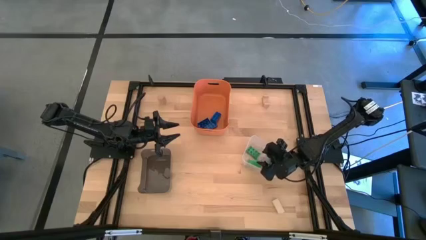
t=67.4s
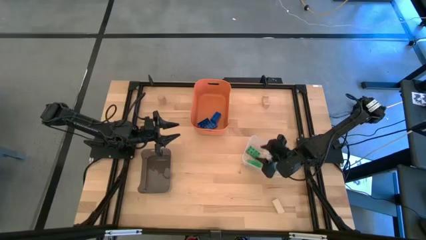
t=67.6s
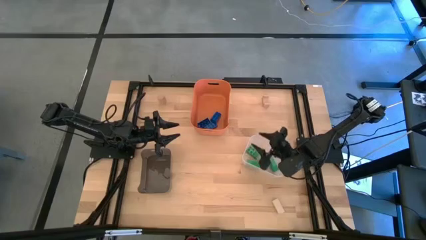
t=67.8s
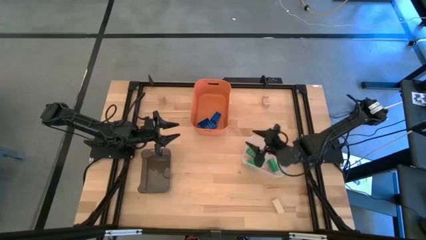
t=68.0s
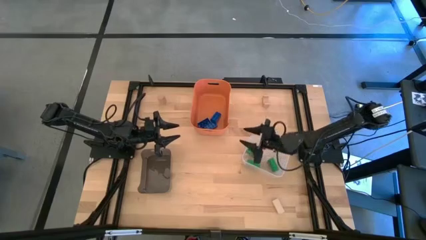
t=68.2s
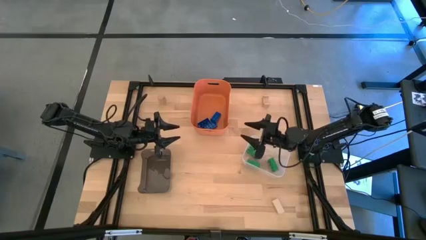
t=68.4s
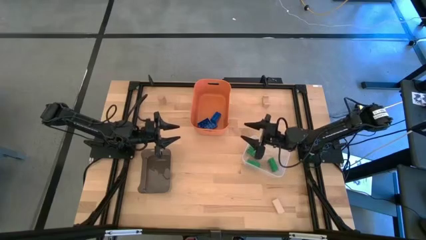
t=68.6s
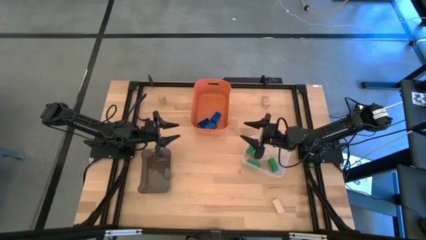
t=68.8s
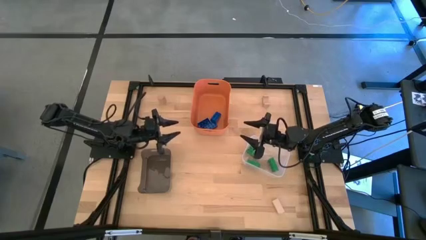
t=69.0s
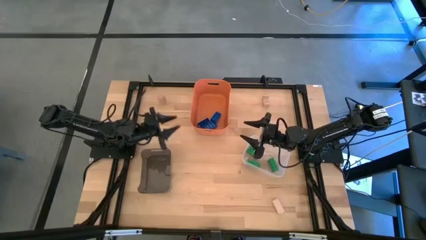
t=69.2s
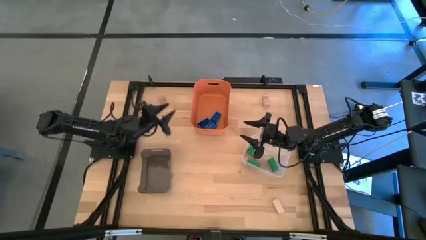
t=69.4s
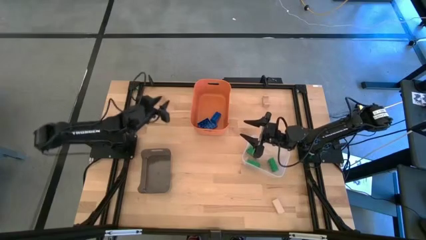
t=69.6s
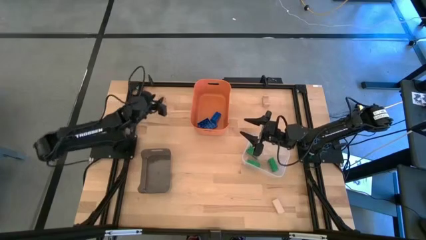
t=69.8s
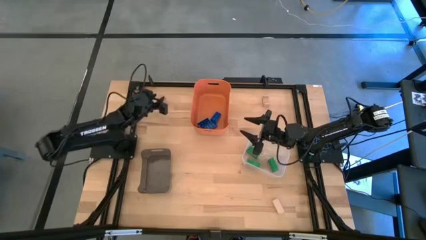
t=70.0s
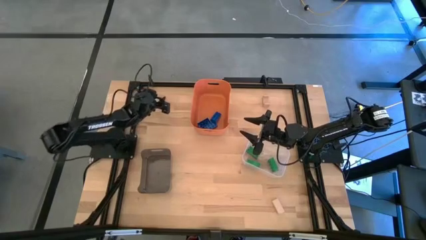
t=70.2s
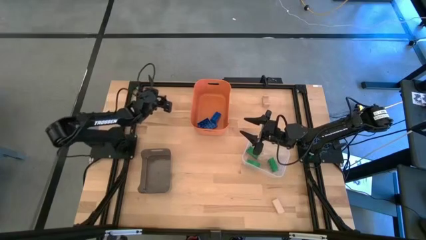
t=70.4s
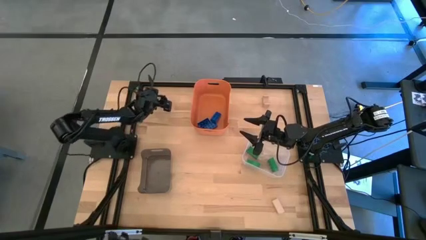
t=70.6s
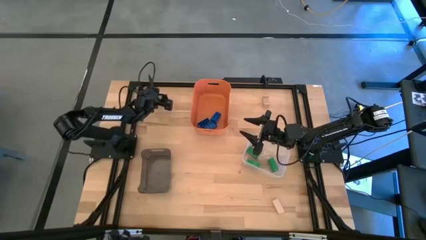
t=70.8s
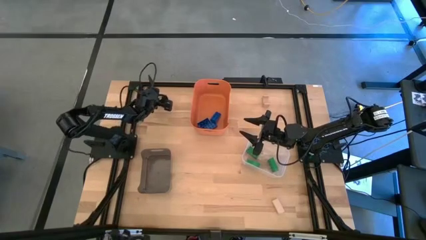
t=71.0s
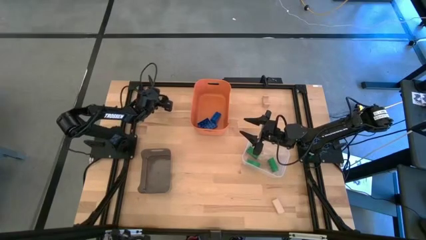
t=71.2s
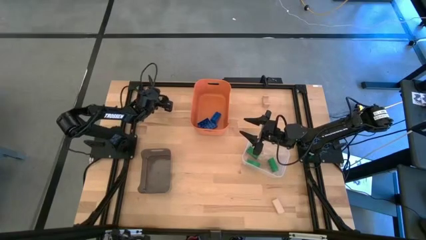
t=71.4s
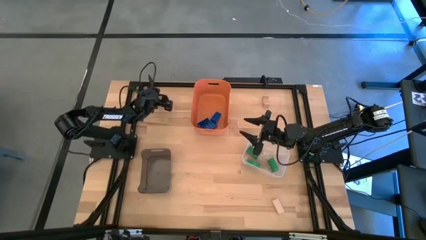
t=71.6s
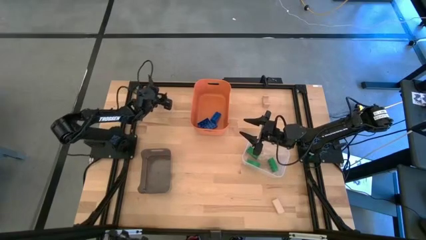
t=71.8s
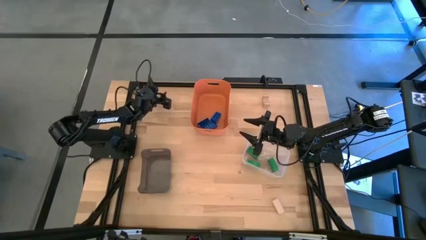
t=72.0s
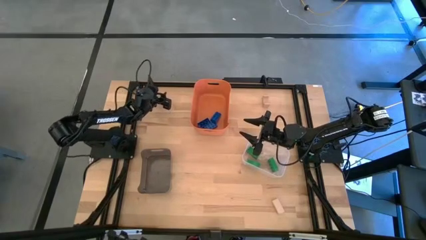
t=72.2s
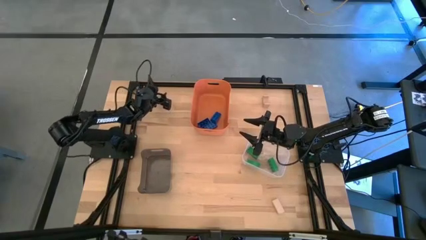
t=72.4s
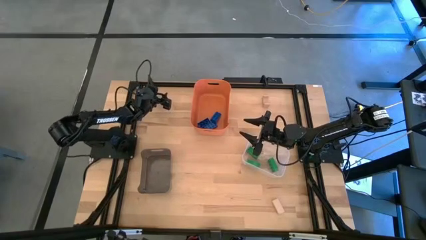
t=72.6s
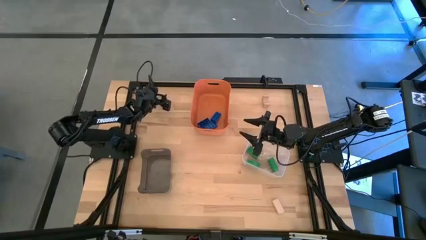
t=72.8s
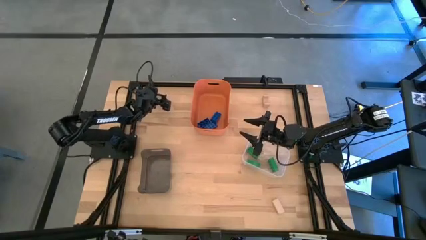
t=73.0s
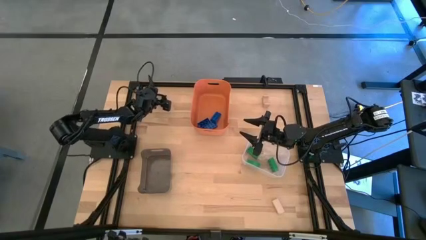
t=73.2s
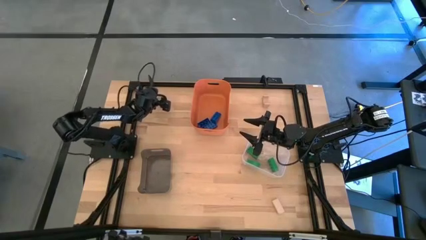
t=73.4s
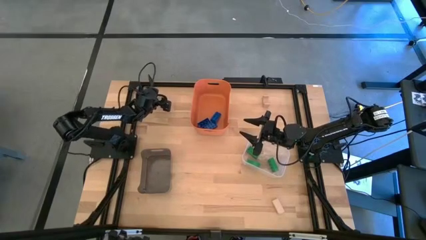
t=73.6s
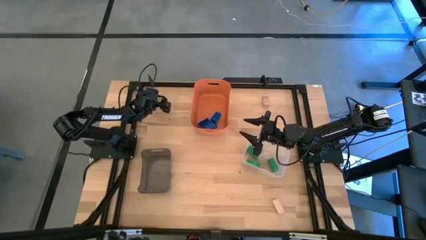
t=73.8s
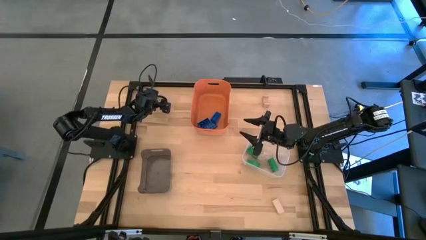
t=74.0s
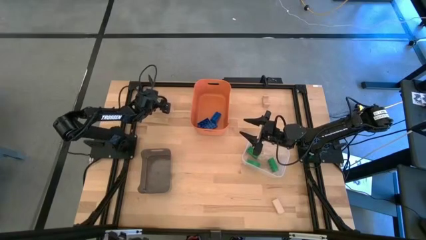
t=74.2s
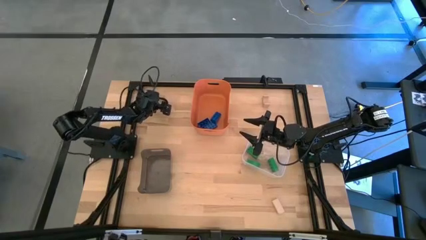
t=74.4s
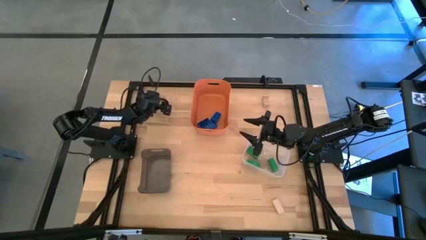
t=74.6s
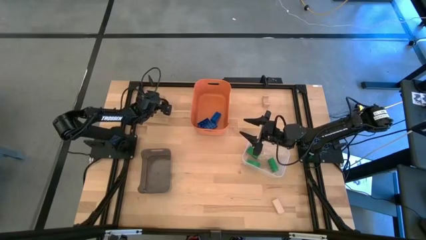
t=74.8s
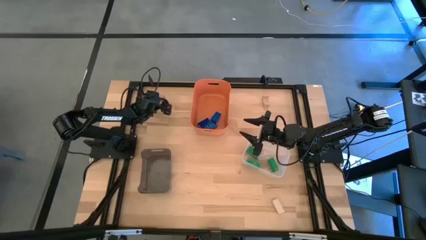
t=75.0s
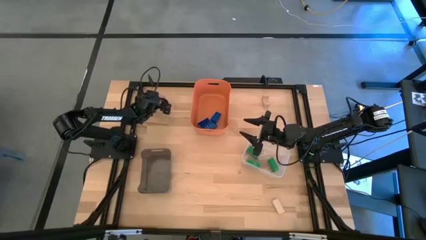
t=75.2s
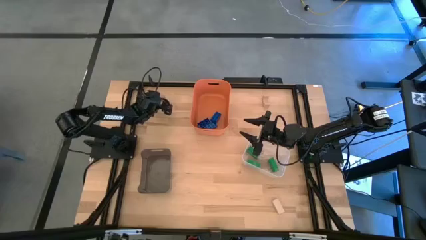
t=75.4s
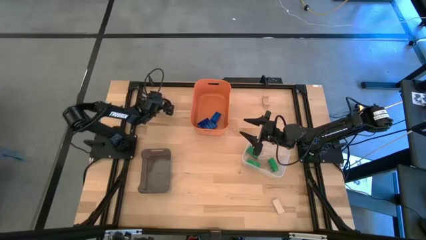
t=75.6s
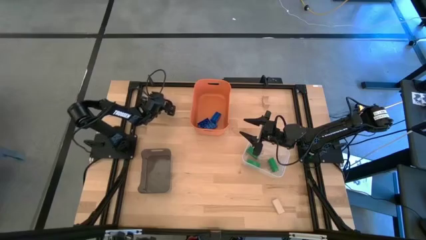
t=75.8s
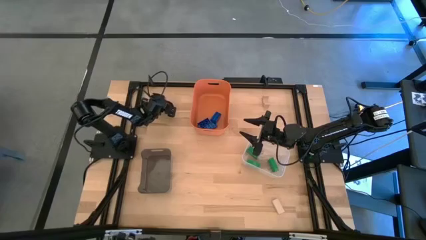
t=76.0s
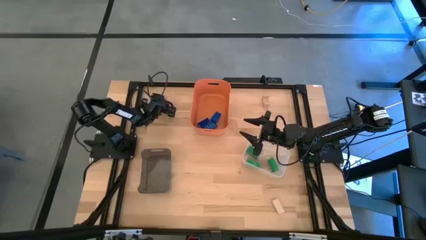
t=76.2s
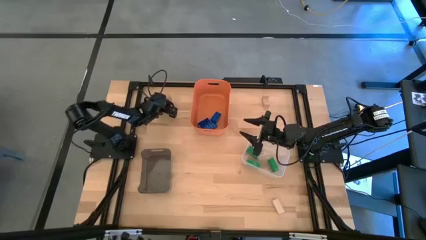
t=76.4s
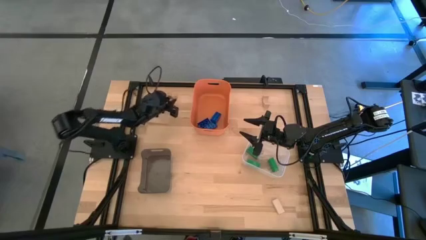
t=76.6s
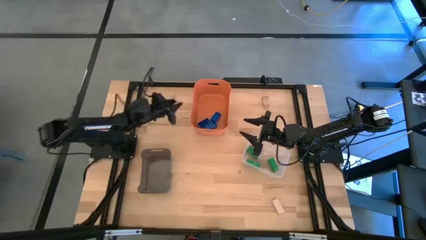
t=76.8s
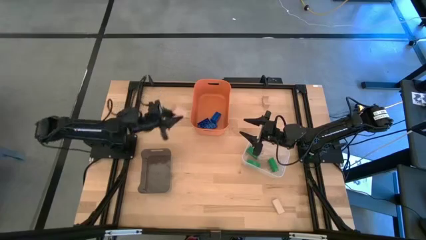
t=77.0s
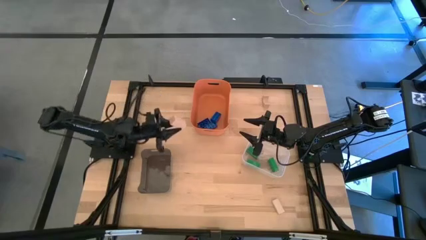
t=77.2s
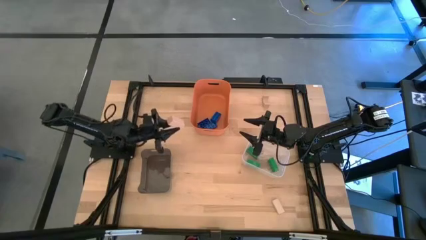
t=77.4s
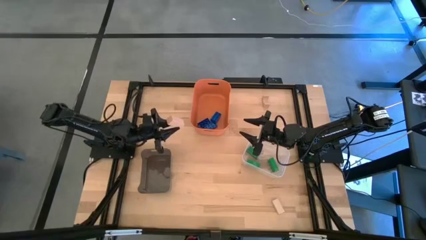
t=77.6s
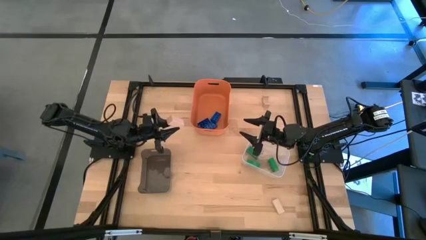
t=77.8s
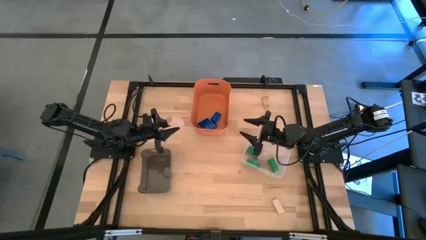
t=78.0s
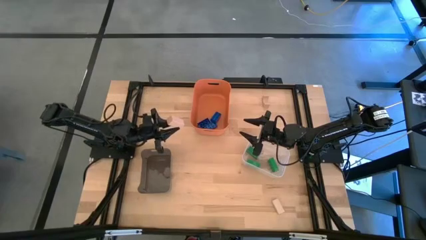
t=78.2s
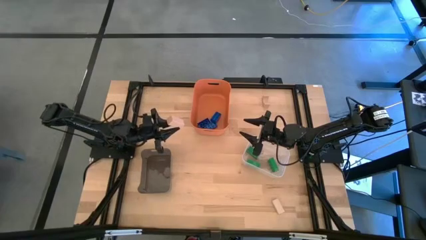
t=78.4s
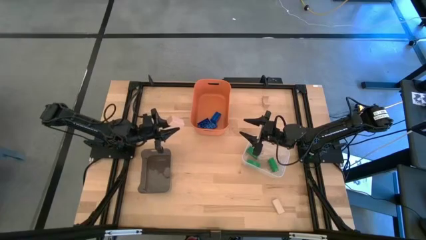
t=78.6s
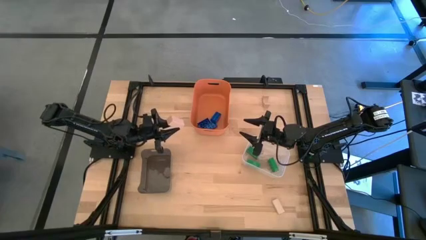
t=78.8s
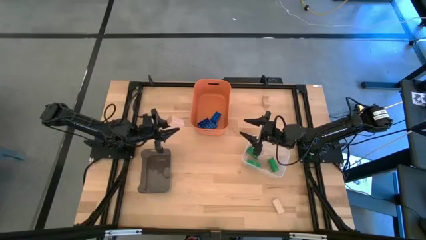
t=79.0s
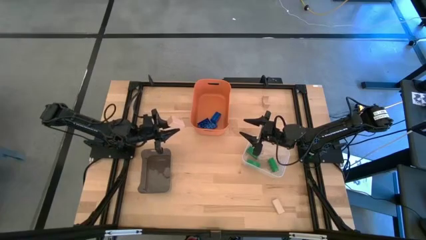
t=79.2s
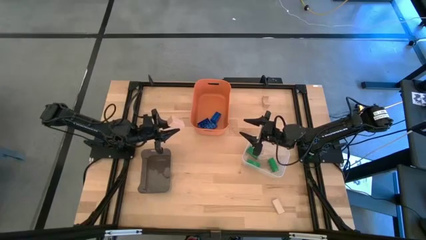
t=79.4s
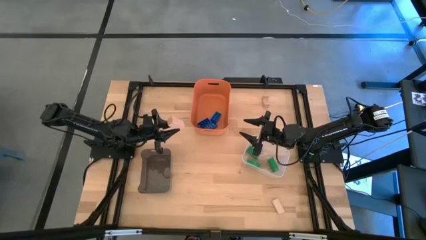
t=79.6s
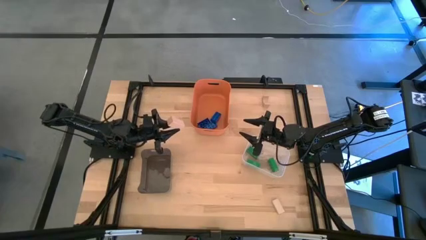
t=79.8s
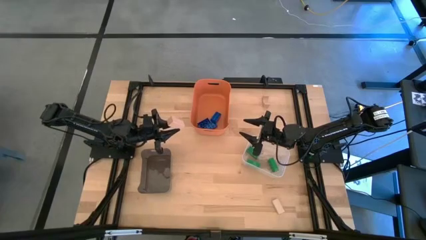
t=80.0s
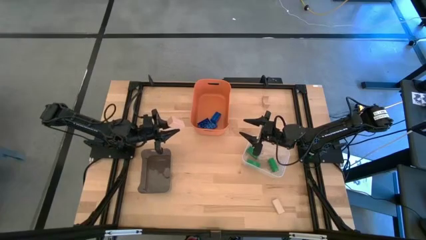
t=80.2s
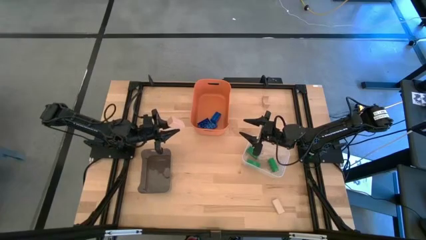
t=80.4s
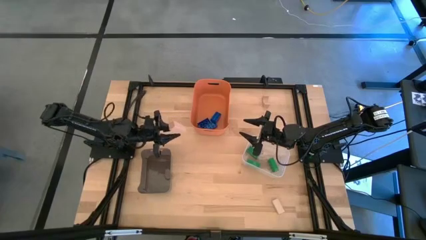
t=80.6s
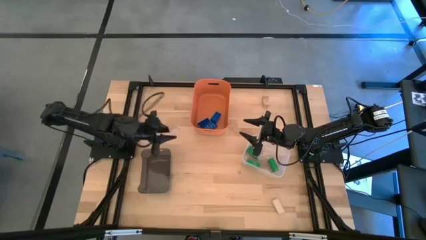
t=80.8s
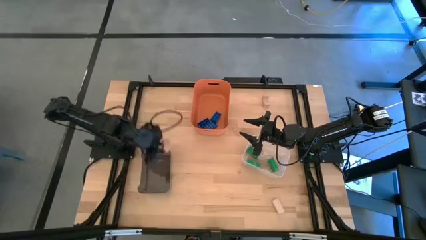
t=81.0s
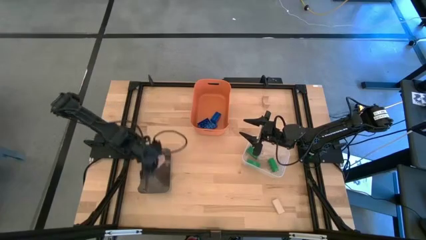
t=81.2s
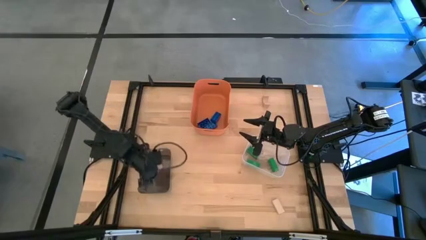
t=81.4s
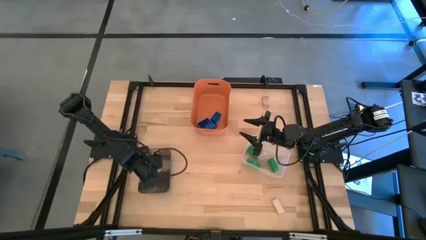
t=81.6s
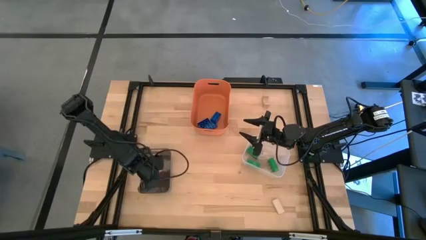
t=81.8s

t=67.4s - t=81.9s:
Task: Sort & place blocks by color
Put the top left brown block into the black bin
